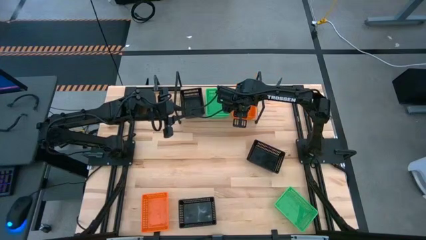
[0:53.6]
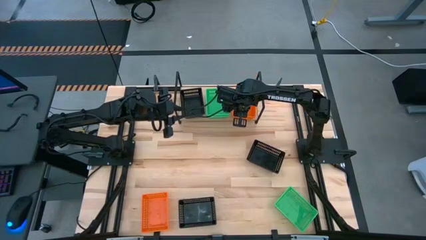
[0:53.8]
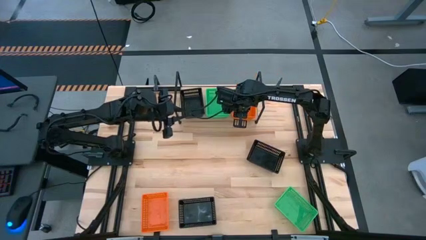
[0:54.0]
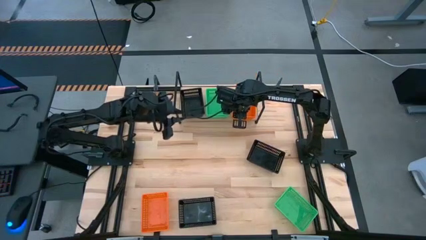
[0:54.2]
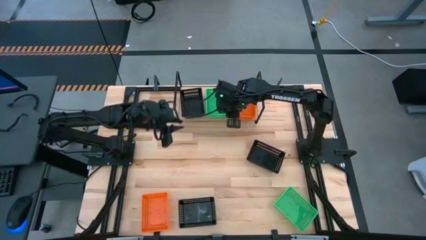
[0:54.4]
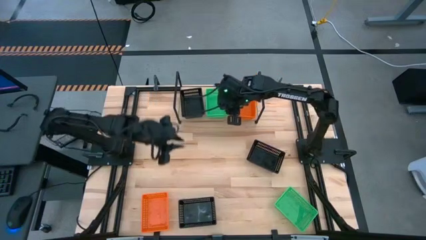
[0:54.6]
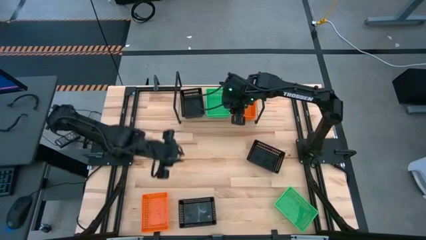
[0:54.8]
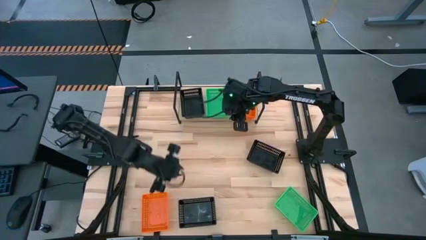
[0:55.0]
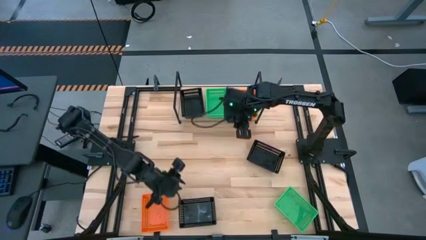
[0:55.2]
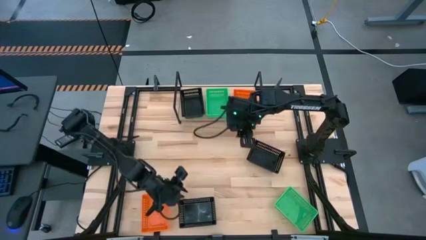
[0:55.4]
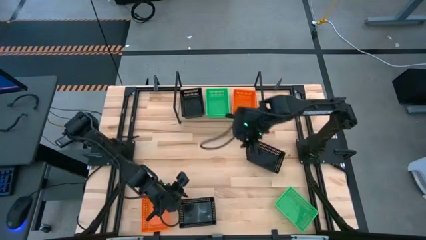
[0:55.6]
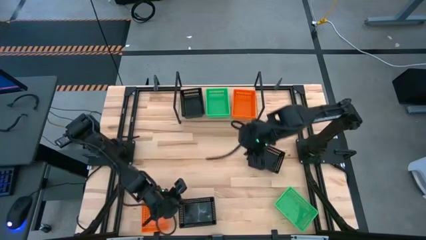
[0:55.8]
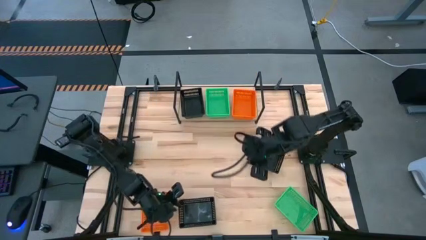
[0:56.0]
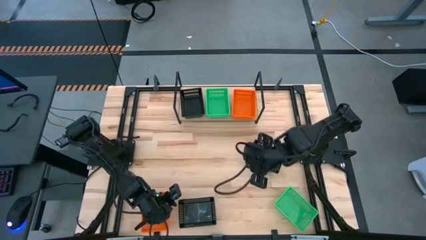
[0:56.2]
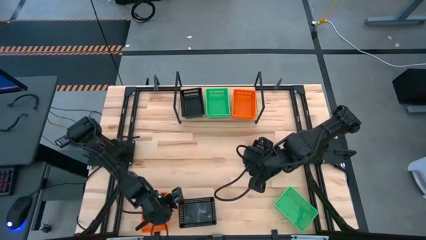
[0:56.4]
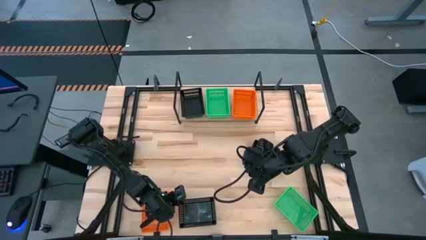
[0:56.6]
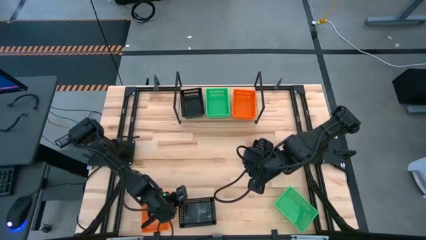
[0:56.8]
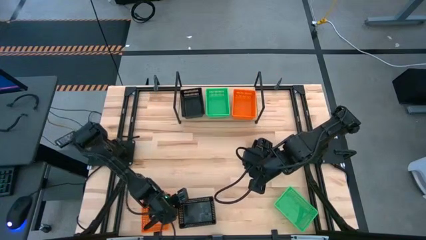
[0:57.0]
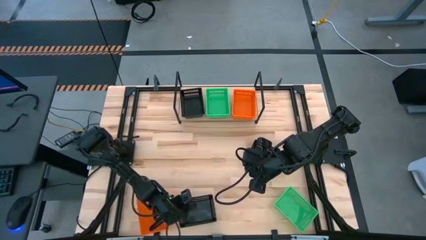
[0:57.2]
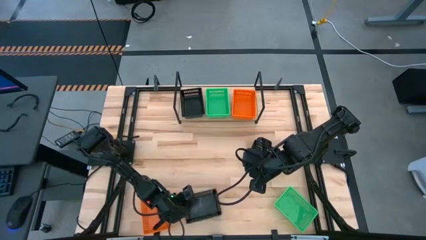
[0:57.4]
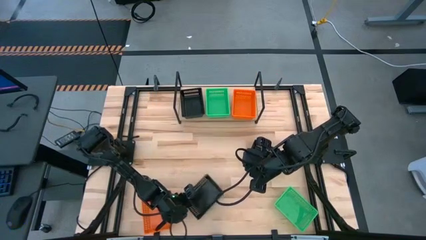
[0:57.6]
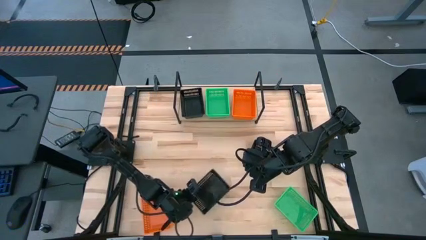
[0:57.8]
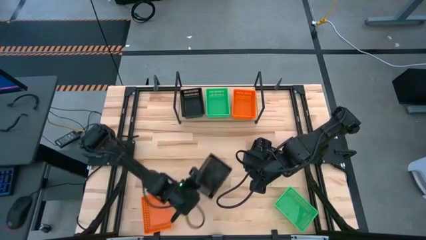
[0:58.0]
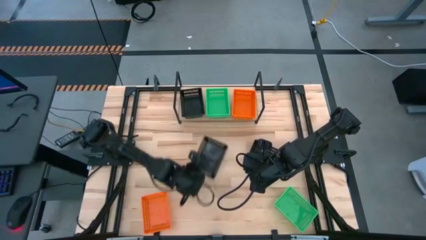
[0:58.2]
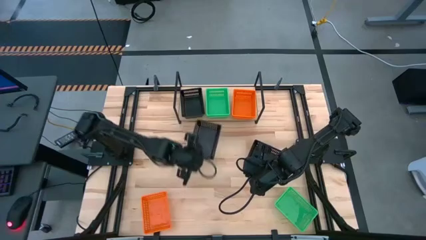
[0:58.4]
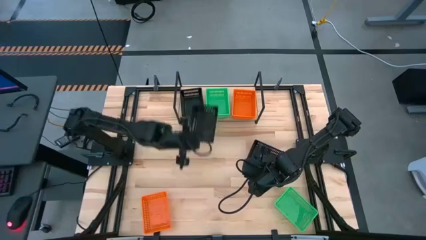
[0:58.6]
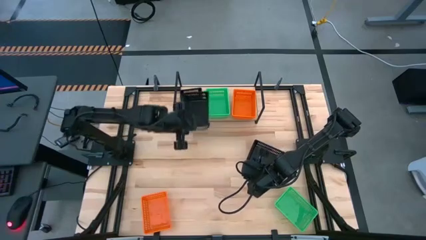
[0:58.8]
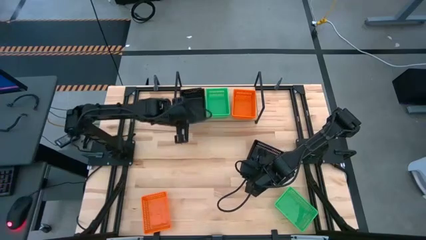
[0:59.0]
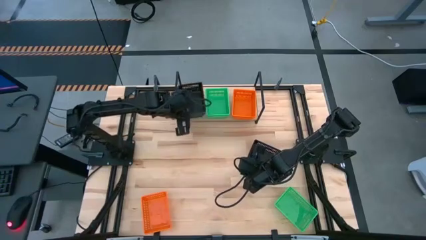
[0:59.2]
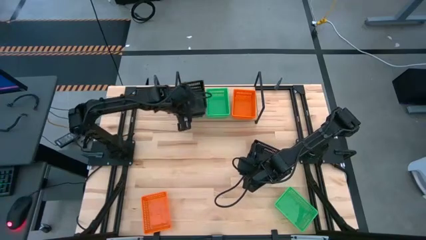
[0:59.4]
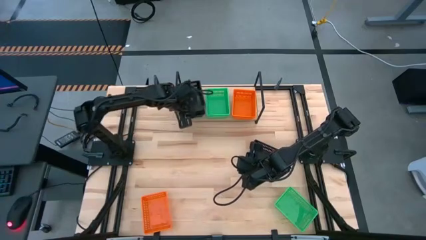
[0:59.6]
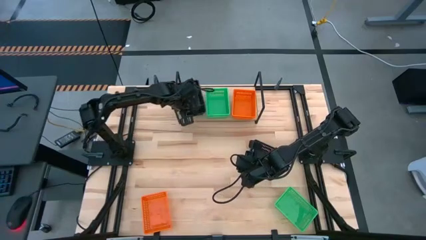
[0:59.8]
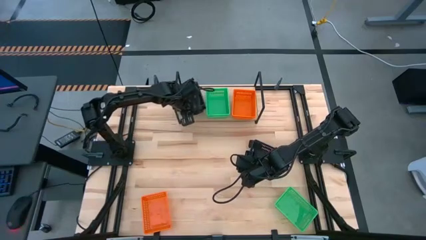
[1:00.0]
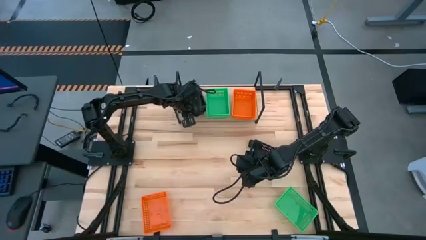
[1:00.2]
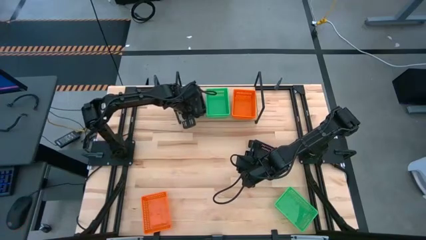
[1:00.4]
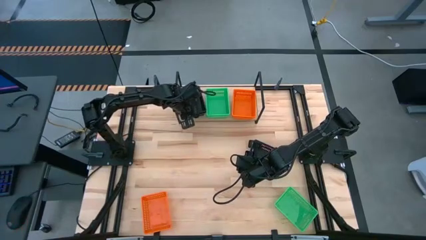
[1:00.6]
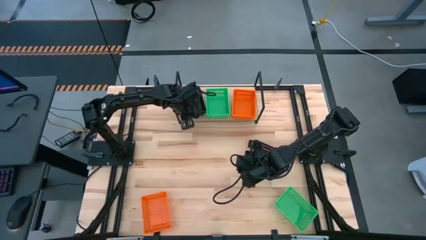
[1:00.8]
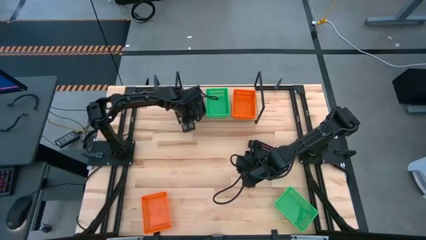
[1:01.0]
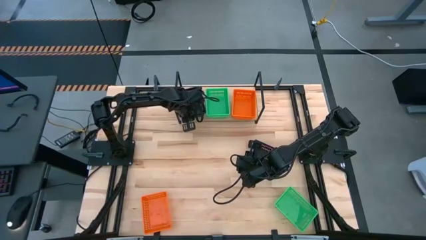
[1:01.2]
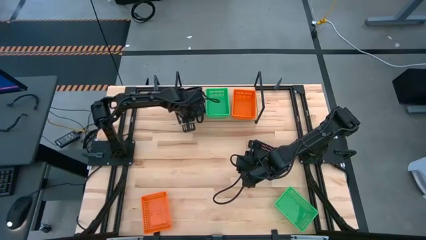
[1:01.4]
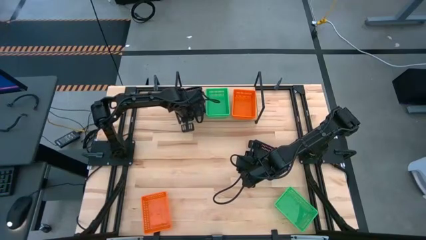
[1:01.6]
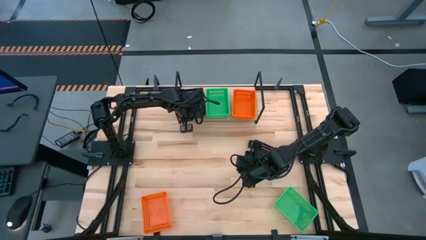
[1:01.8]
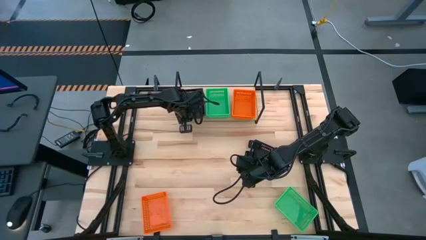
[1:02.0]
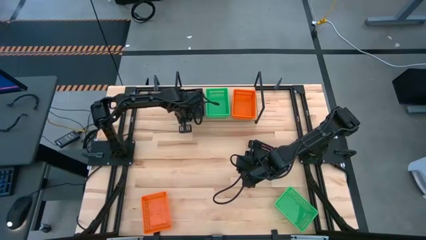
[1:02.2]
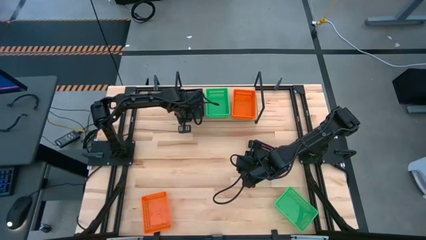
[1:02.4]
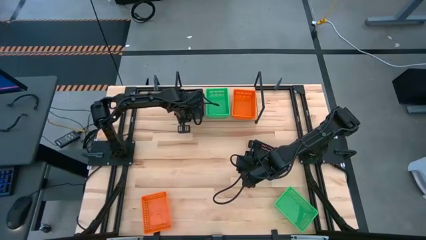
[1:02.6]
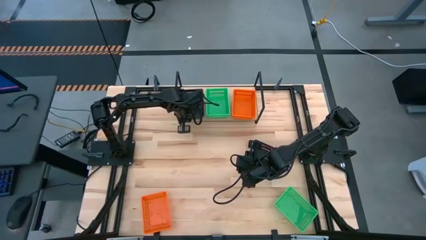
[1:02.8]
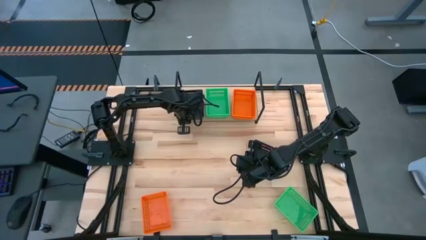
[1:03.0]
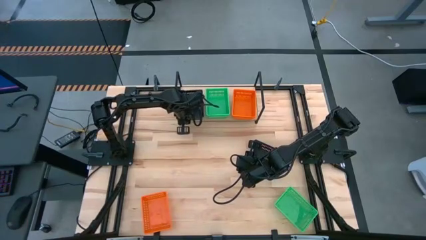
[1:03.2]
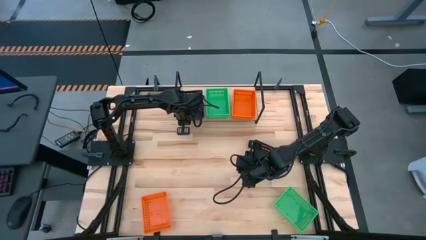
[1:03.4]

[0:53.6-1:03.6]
Task: Stack baskets on shelf by color
Stack the bottom black bin on the black bin on the shelf

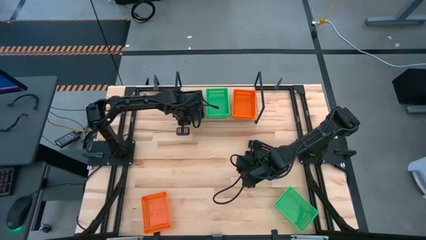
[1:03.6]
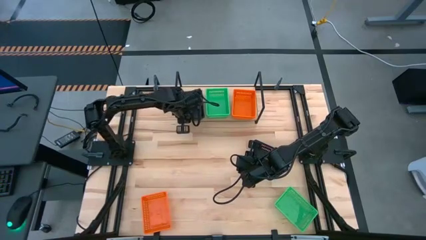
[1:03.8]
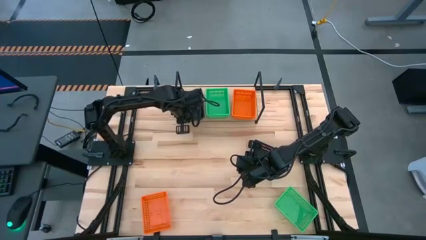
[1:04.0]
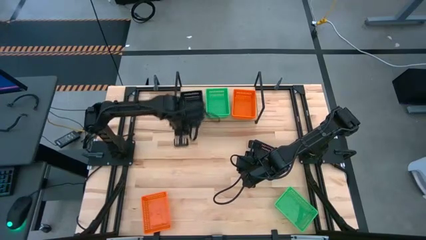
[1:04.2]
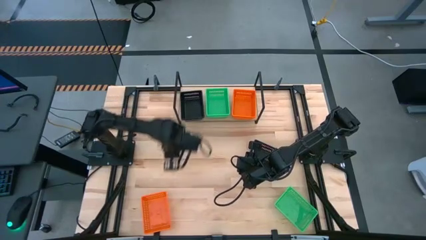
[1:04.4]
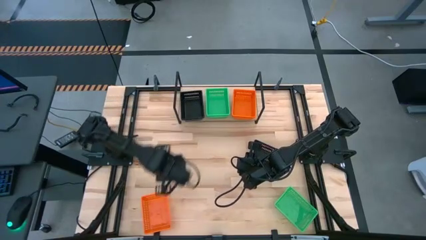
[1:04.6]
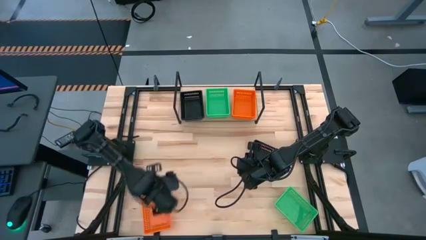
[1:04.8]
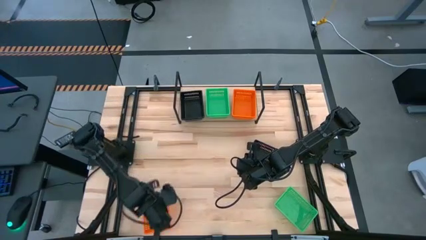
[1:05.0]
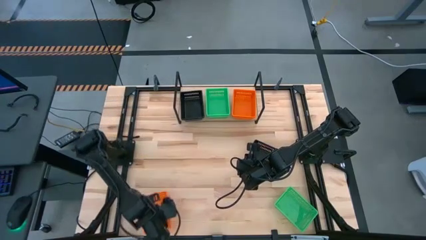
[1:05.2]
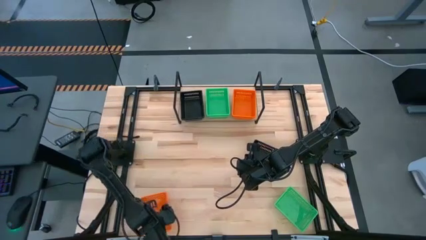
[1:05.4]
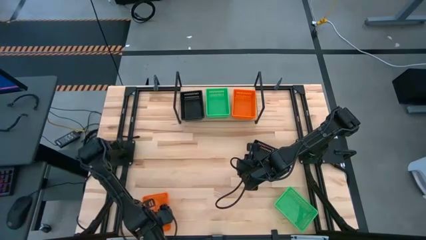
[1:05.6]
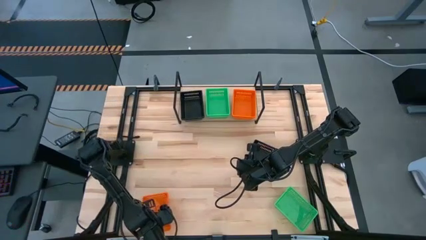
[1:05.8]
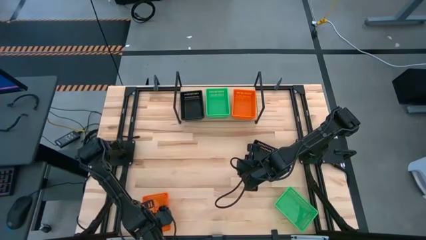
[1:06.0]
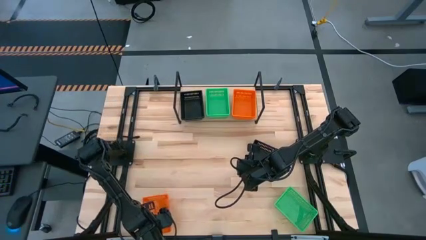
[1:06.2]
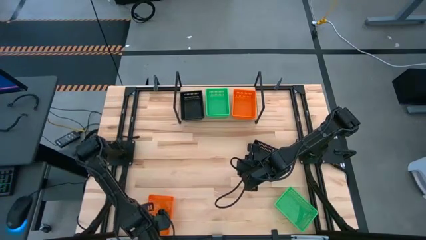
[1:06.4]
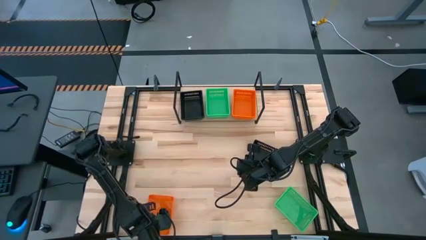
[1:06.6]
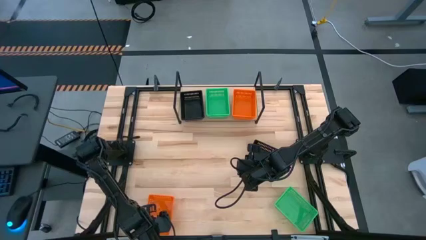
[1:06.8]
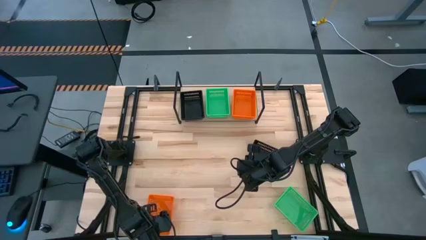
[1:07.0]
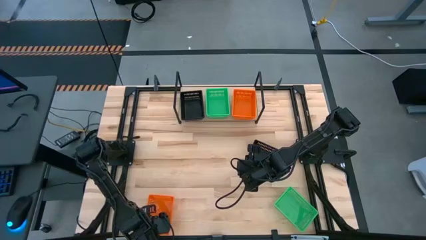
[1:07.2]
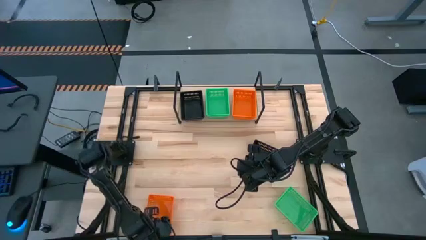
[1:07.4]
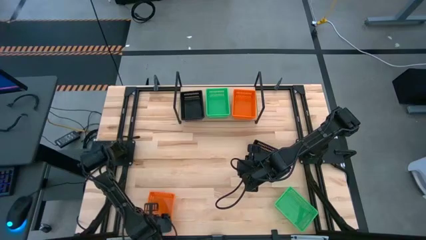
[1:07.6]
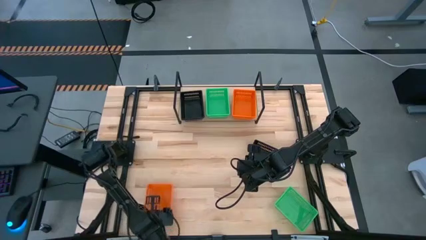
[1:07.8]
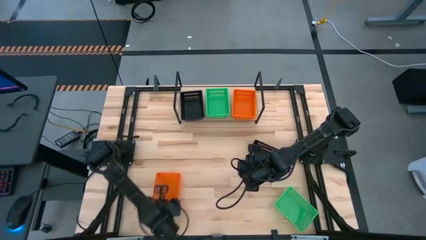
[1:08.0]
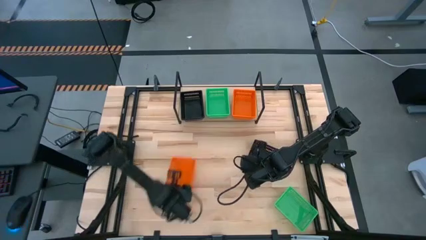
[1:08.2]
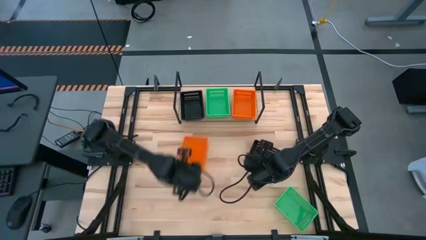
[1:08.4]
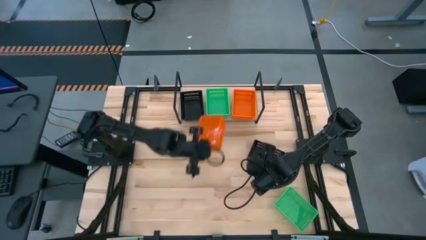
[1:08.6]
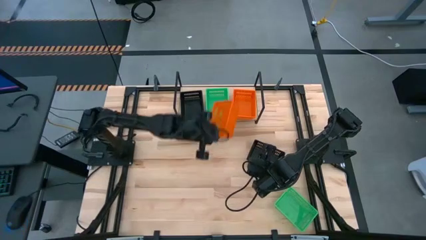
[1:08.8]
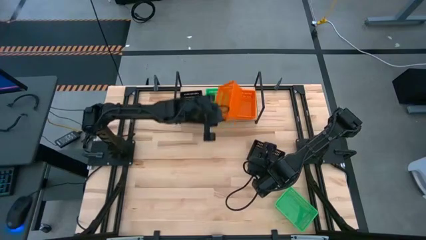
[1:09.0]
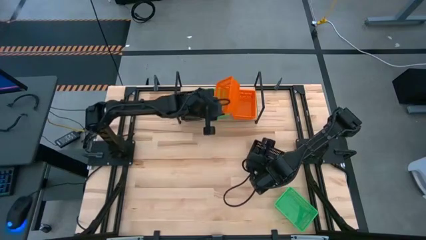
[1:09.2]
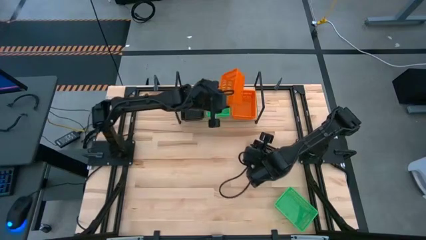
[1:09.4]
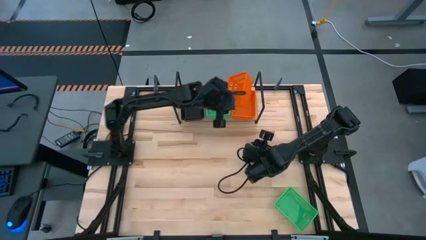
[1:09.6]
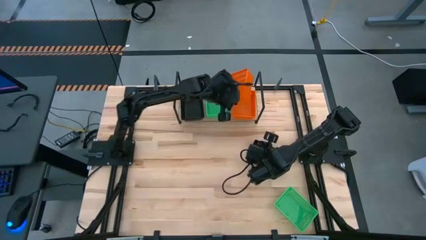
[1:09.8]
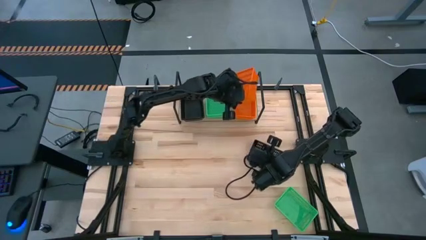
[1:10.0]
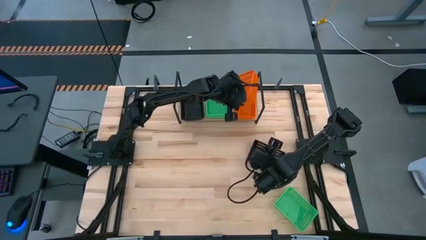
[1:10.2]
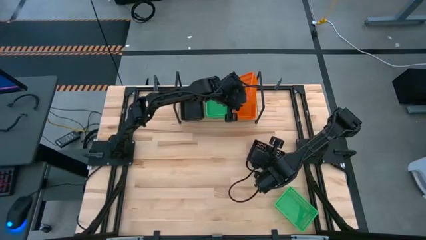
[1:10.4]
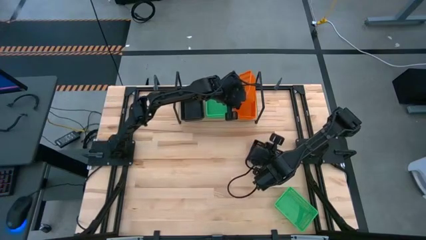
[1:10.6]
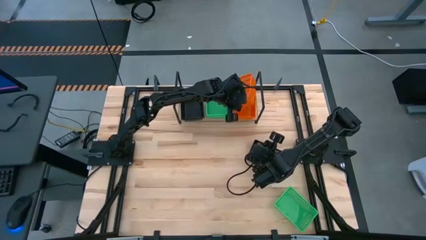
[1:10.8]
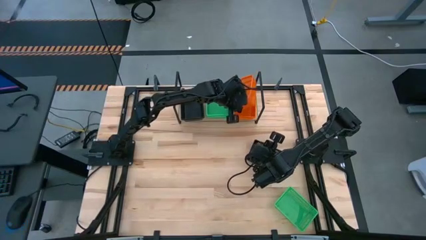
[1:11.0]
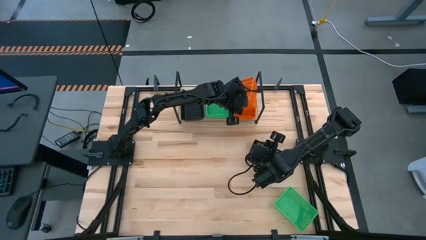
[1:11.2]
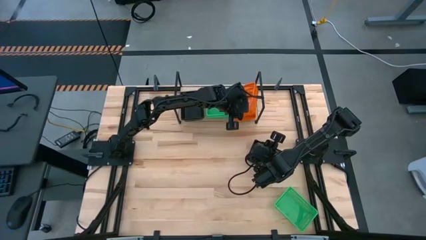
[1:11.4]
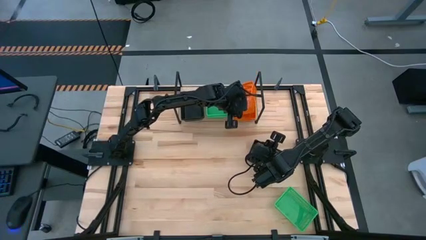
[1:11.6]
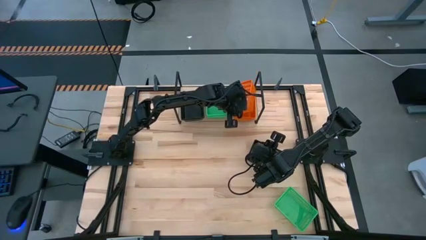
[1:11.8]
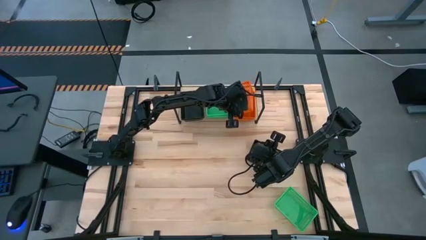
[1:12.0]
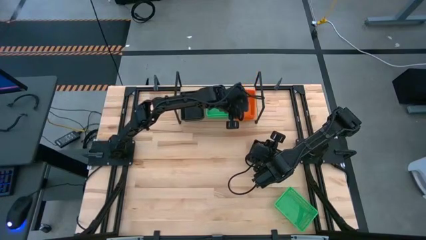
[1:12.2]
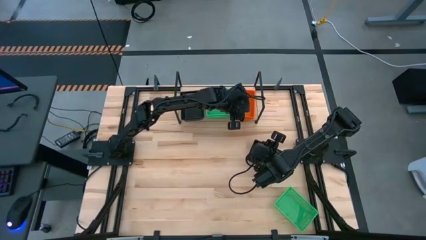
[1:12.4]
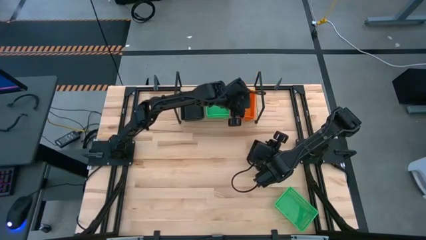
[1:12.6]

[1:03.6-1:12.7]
Stack the orange bin on the orange bin on the shelf
